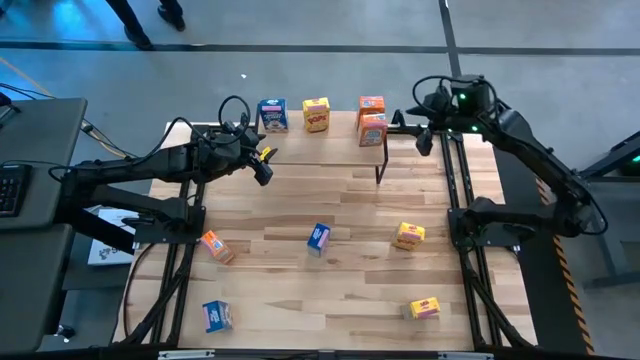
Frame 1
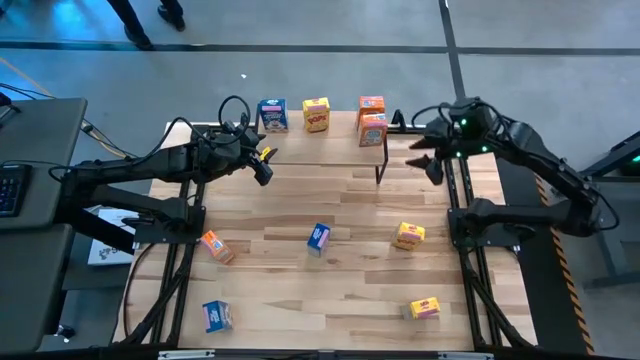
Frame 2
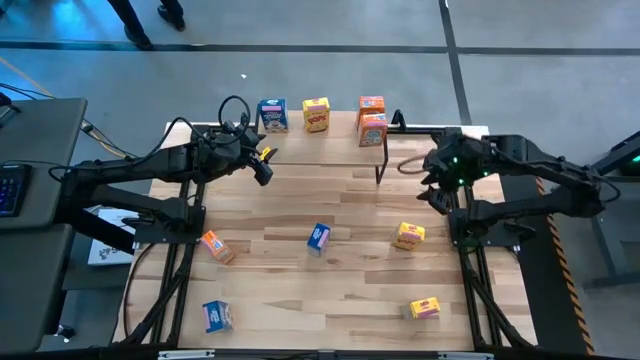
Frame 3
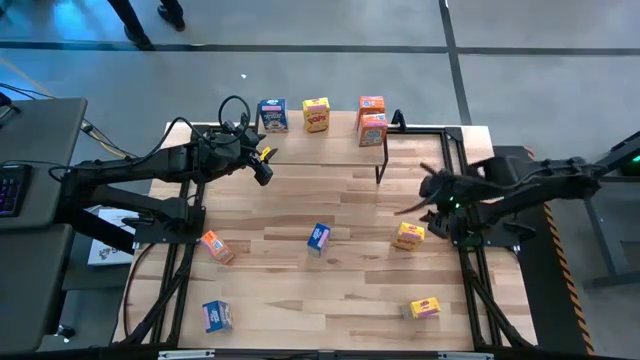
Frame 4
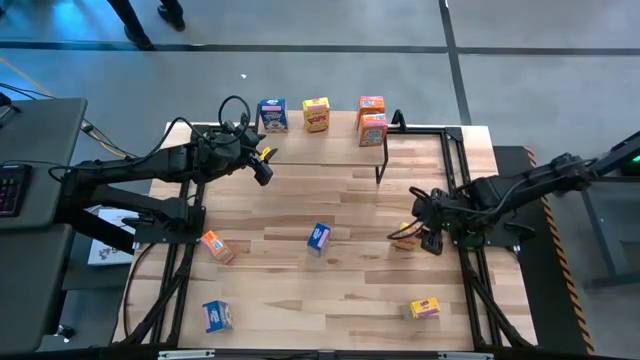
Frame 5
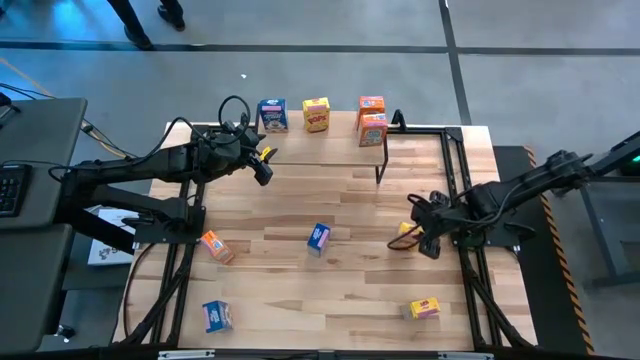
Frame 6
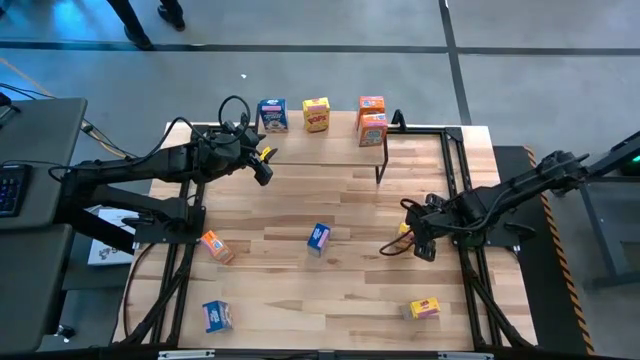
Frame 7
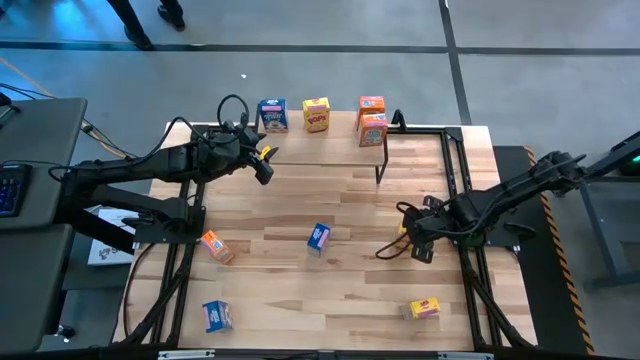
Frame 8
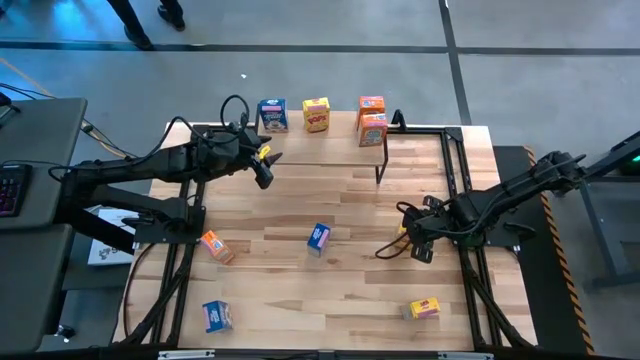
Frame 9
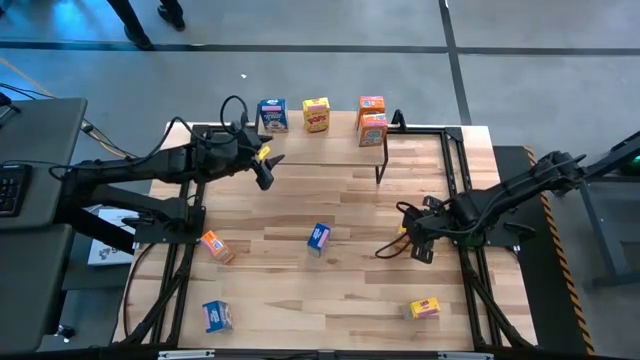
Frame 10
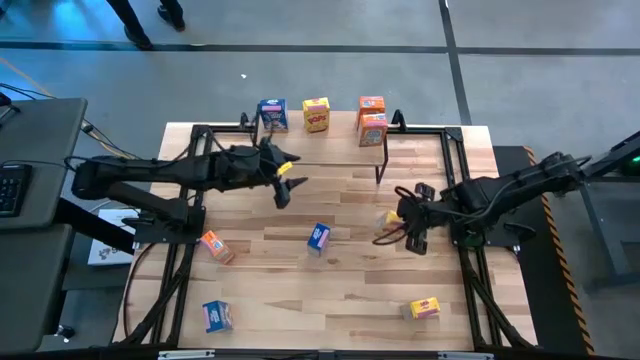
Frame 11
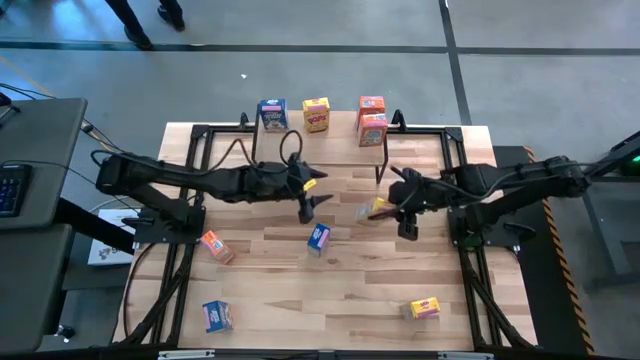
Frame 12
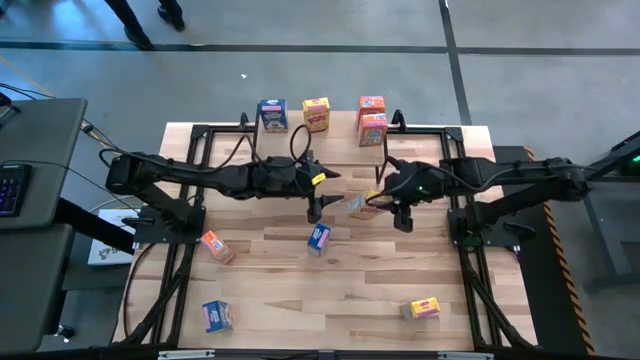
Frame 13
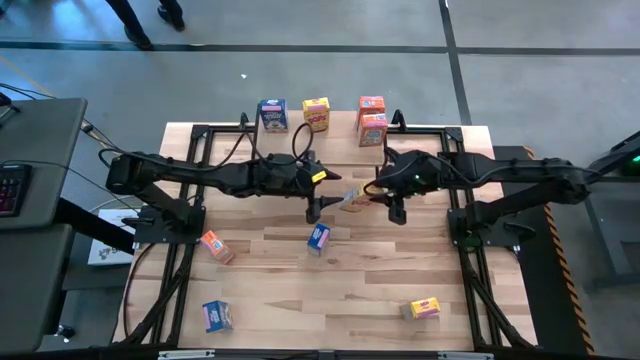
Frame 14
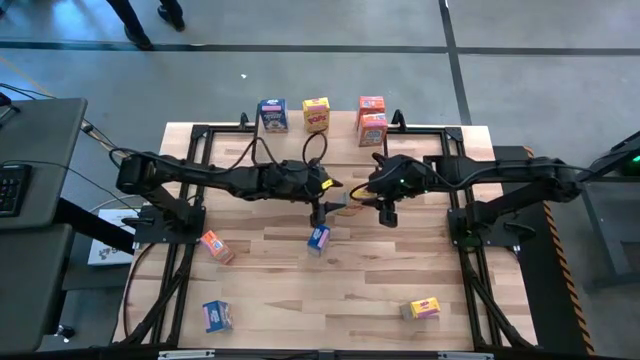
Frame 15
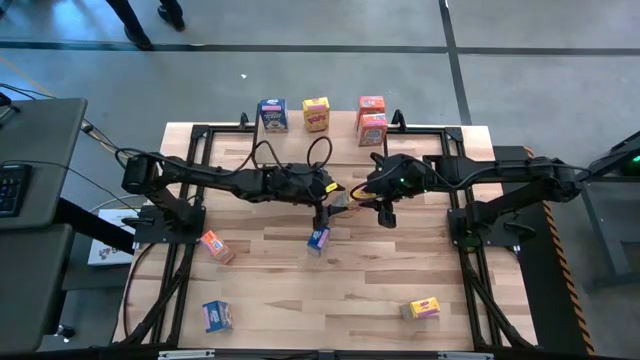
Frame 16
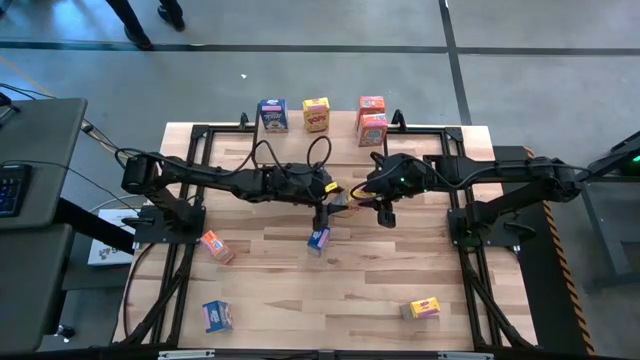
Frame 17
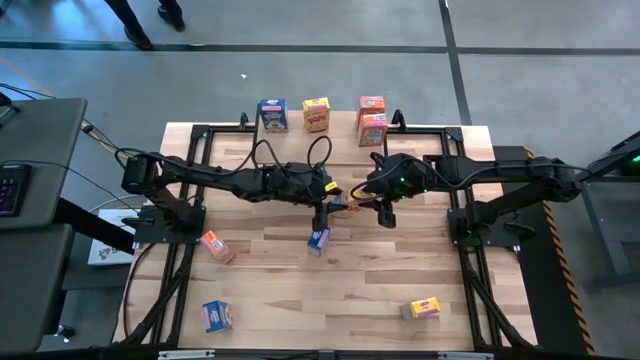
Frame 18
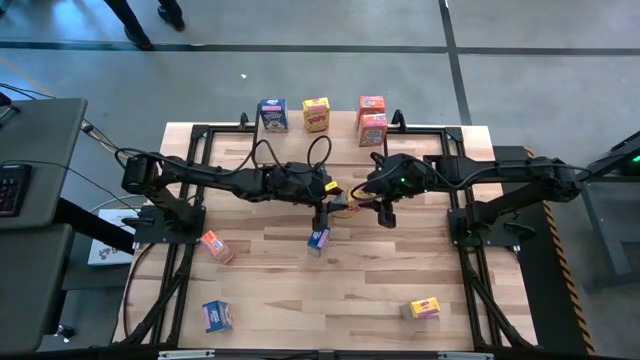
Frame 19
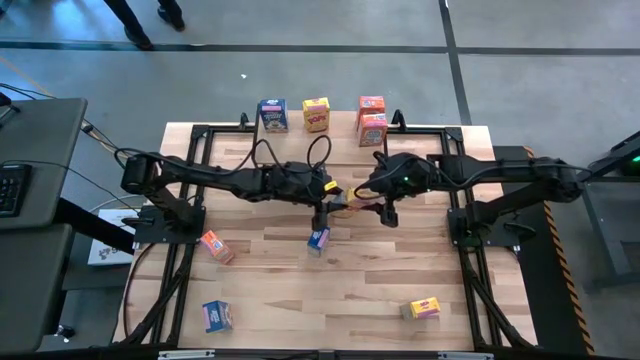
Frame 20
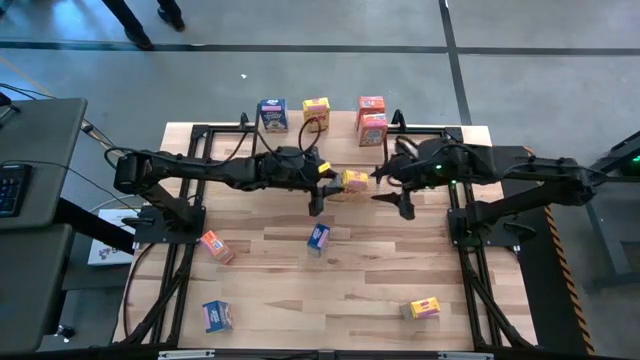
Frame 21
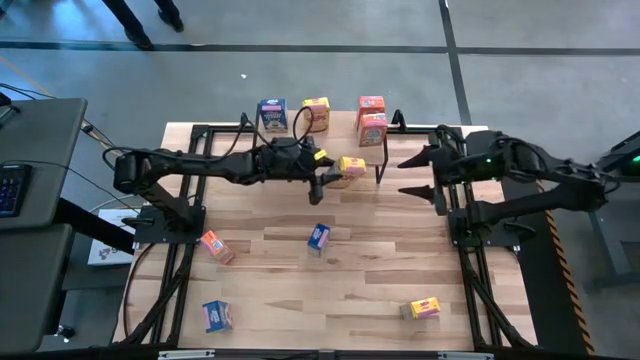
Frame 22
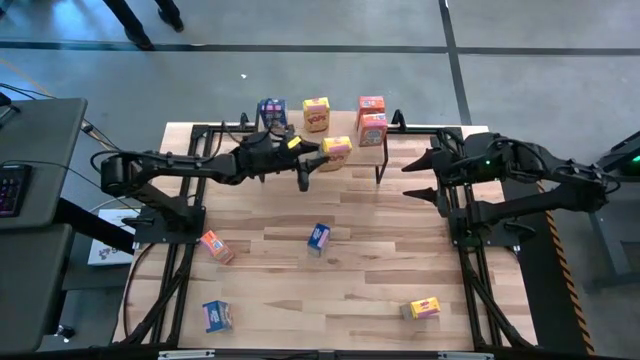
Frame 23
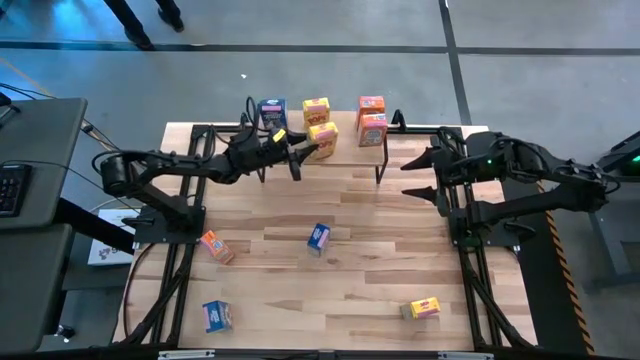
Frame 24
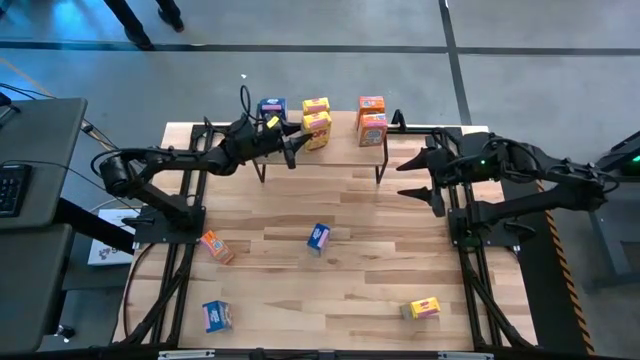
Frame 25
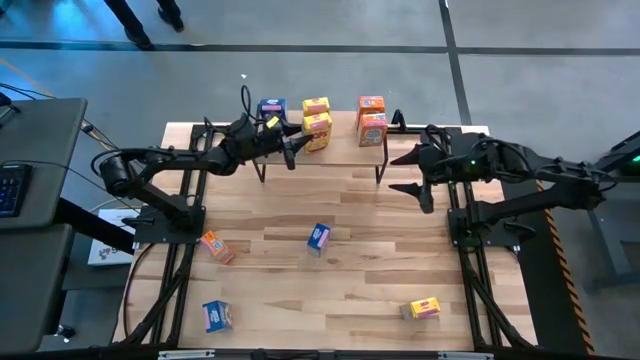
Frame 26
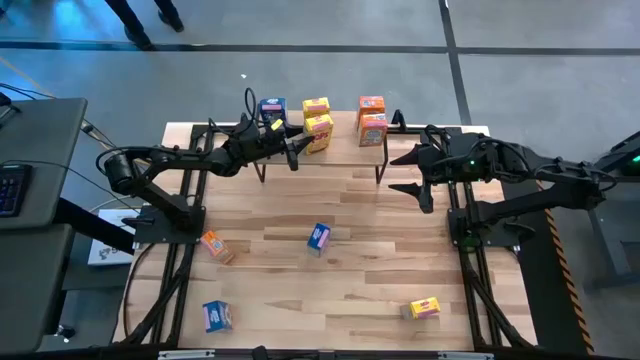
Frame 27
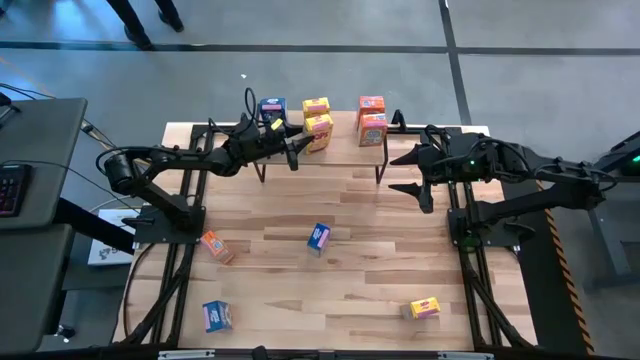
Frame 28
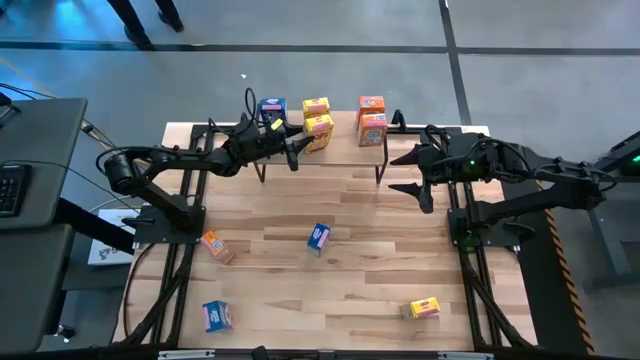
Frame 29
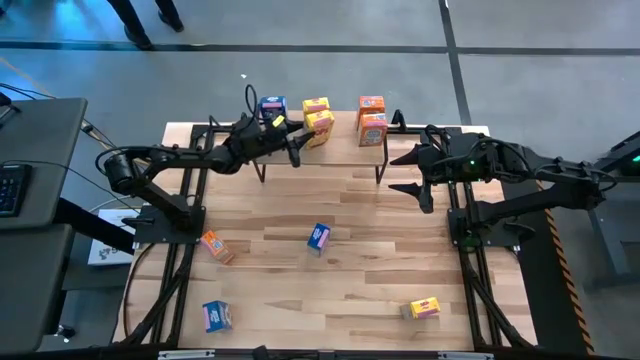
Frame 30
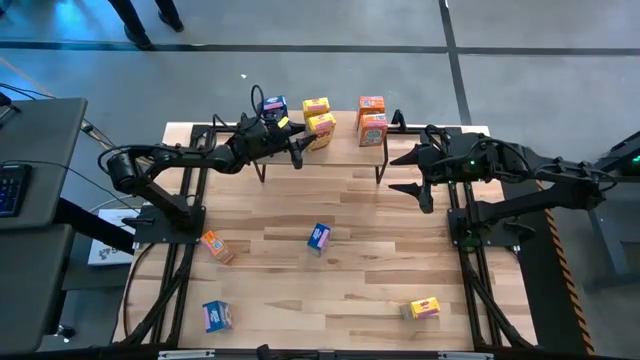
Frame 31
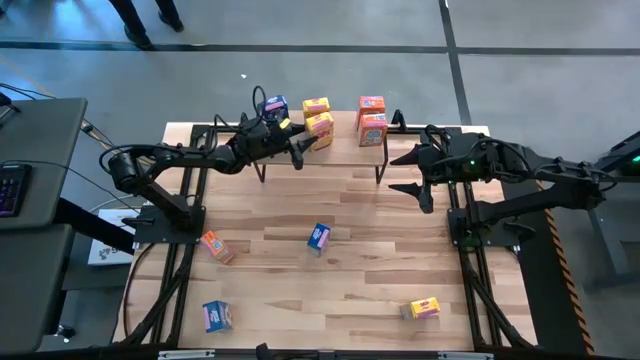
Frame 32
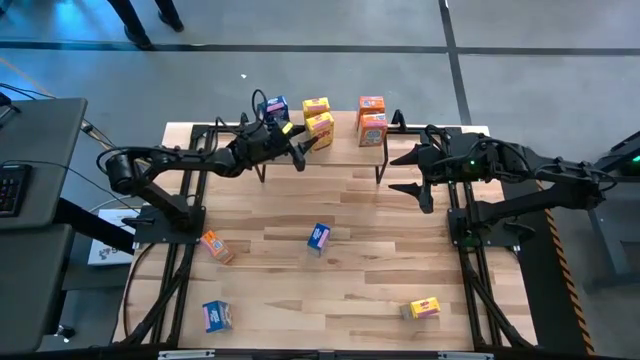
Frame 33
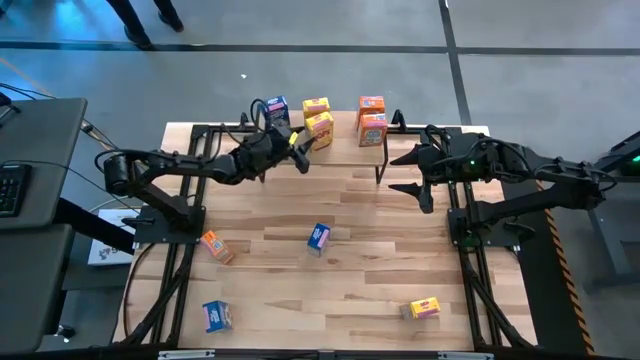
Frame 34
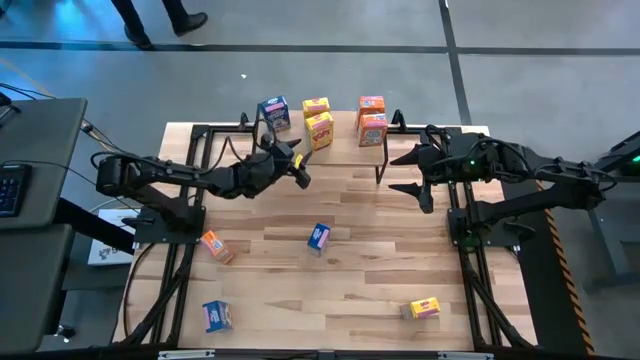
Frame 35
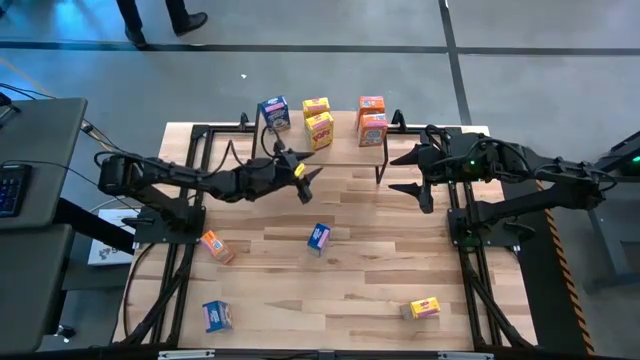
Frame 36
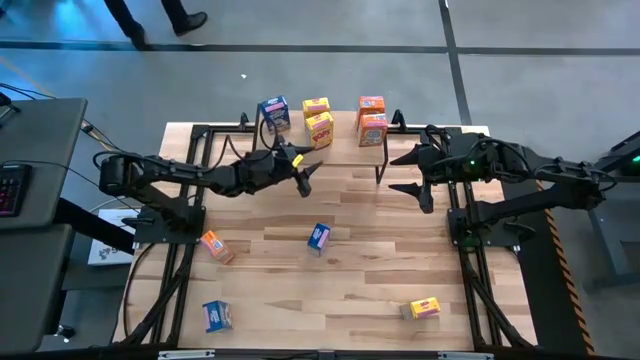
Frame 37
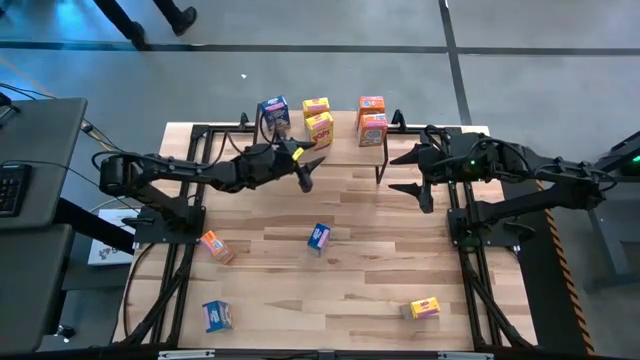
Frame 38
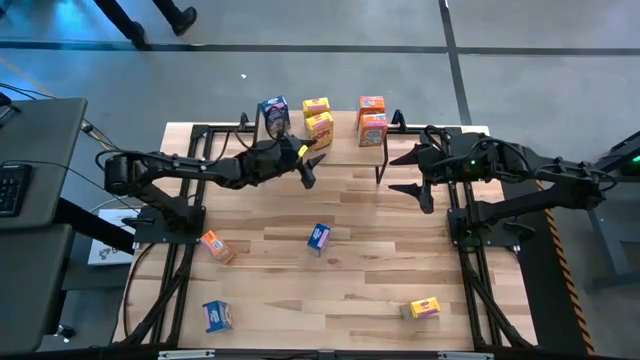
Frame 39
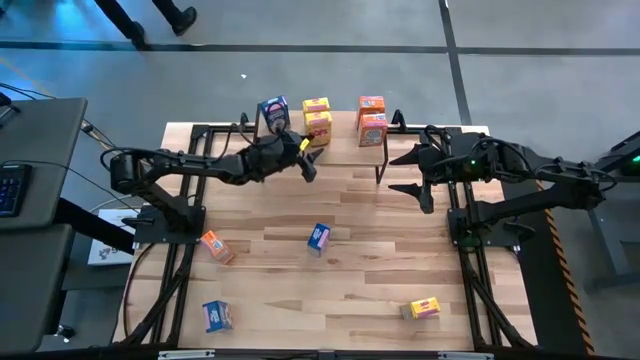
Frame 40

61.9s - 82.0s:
Task: Stack cereal on shelf
Put the top yellow cereal box and aligned with the other yellow cereal box on the shelf

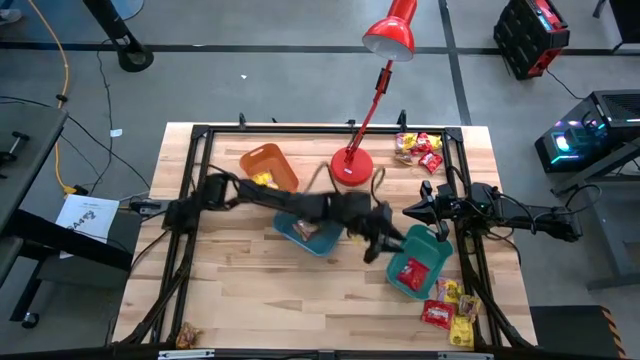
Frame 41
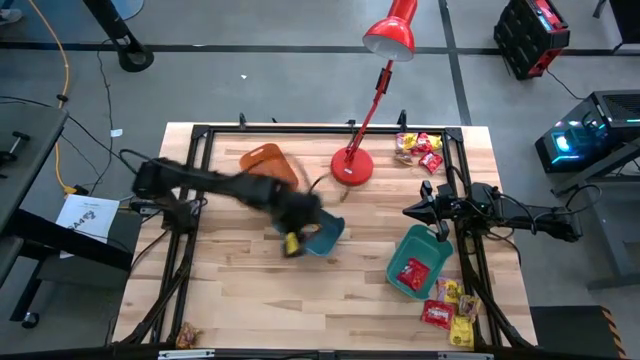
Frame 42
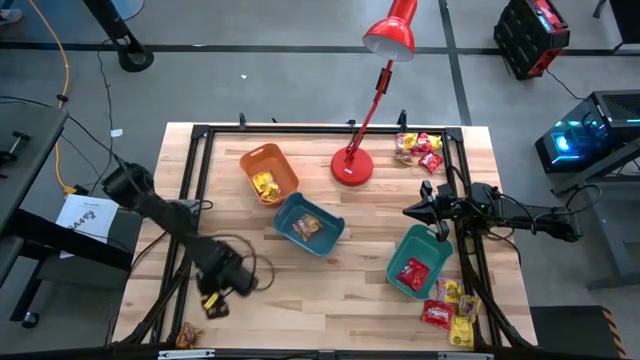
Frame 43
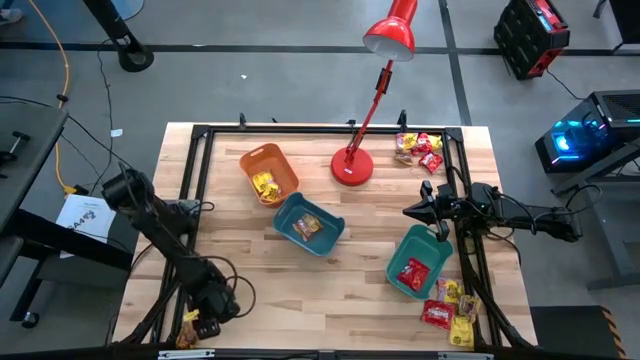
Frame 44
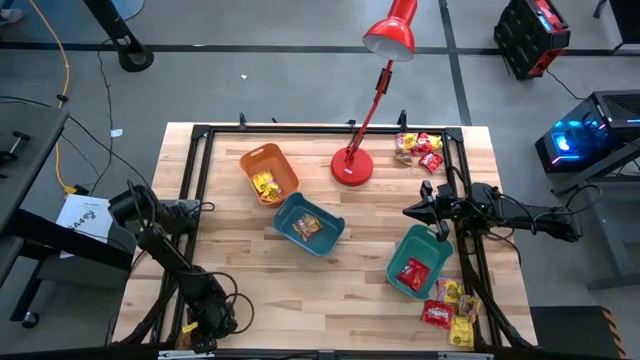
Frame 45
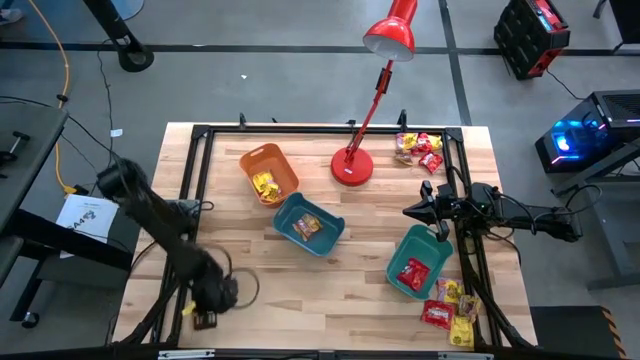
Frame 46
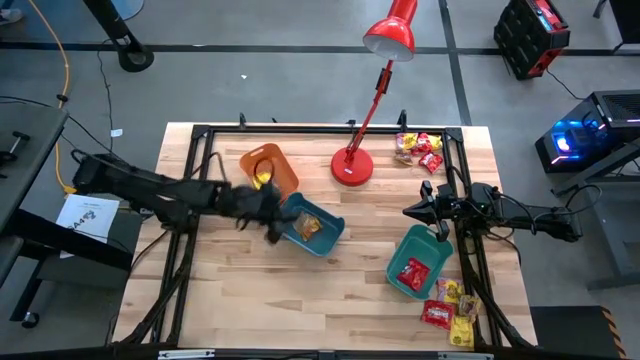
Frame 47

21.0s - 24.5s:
Task: Sort candy
Put the bottom left gold candy into the blue bin
